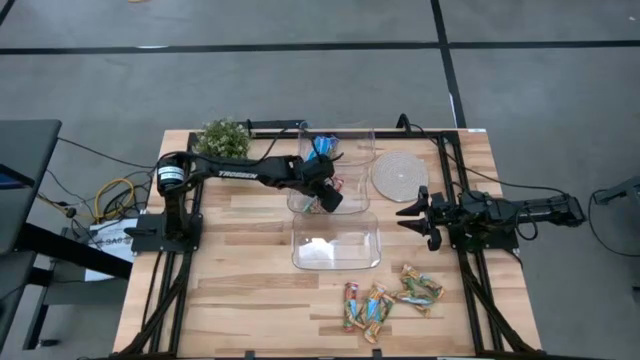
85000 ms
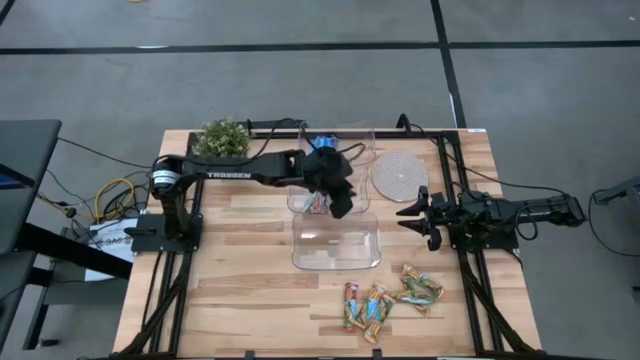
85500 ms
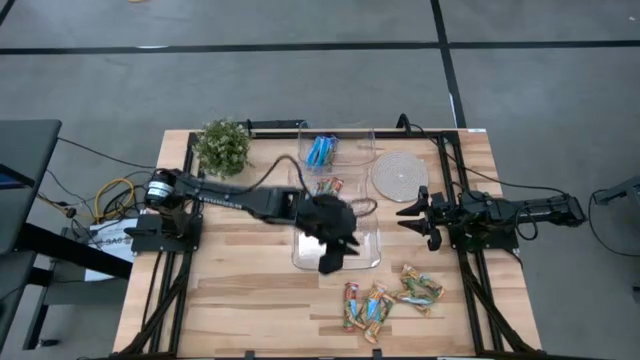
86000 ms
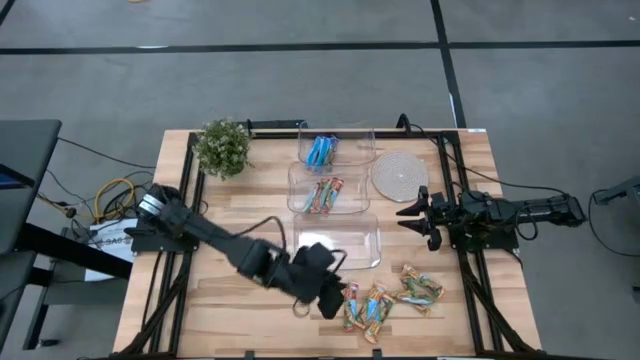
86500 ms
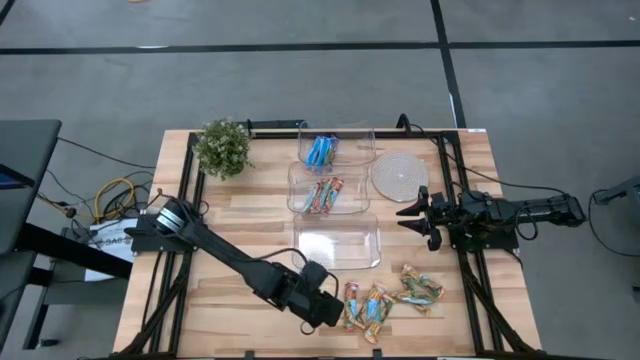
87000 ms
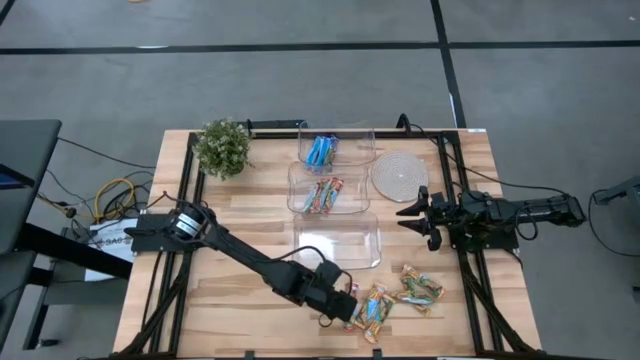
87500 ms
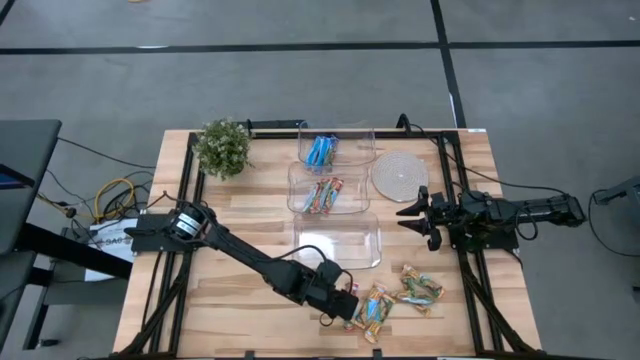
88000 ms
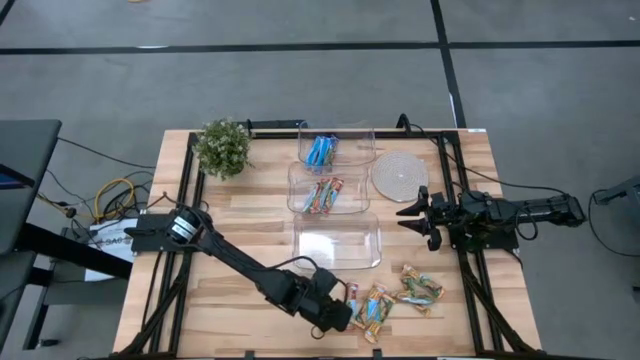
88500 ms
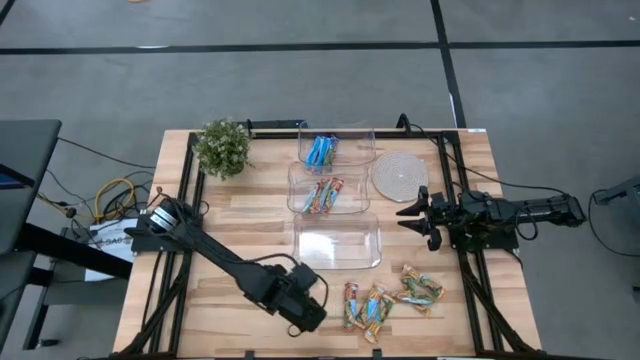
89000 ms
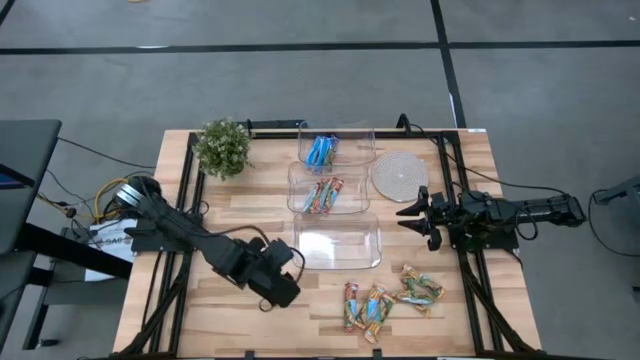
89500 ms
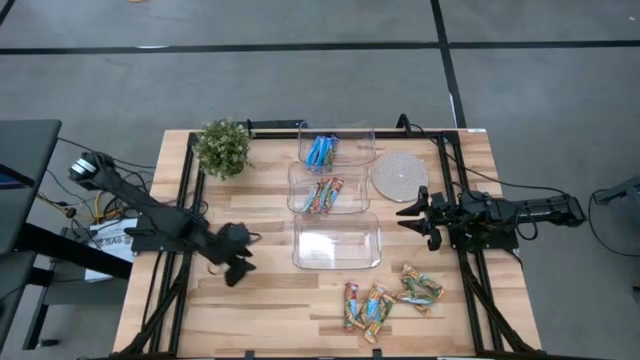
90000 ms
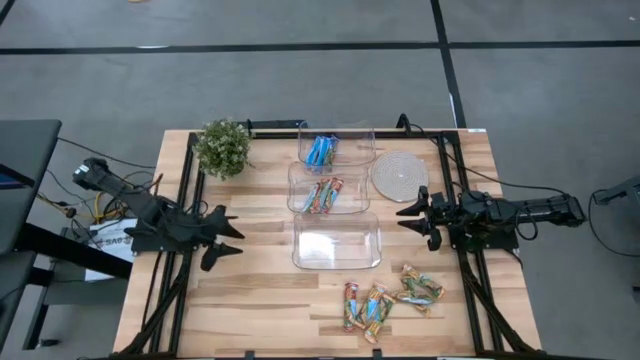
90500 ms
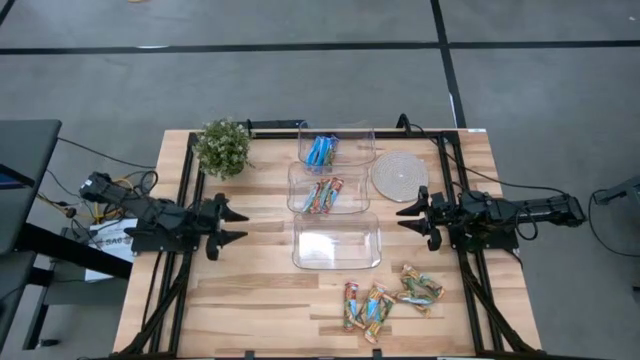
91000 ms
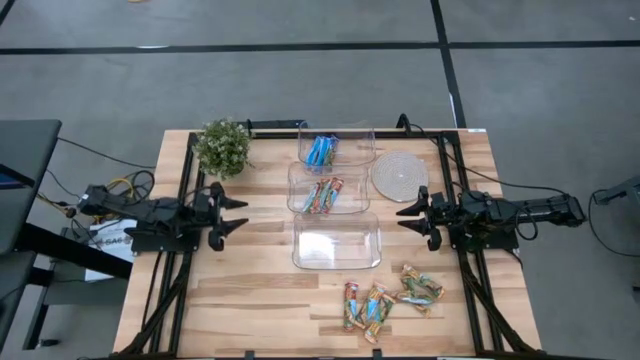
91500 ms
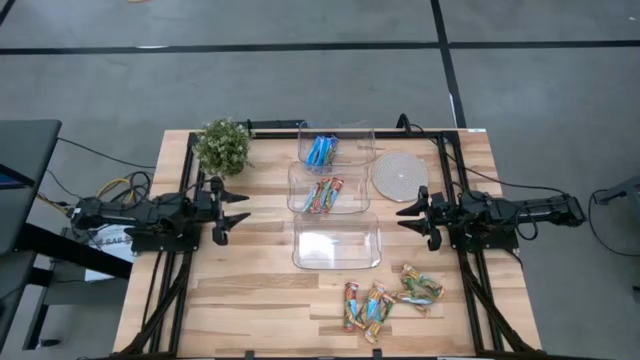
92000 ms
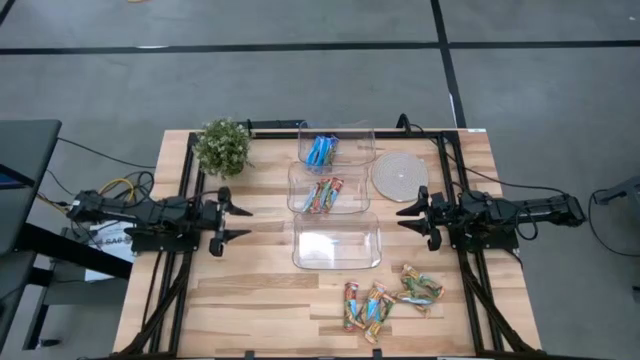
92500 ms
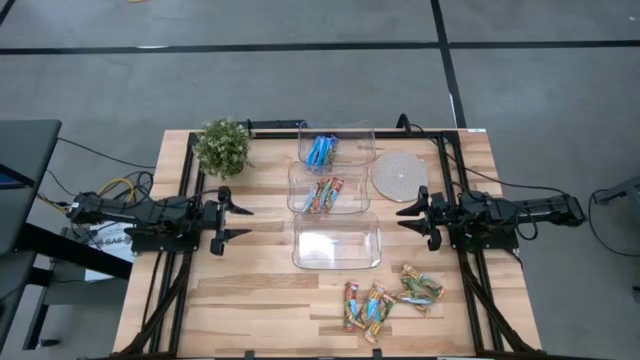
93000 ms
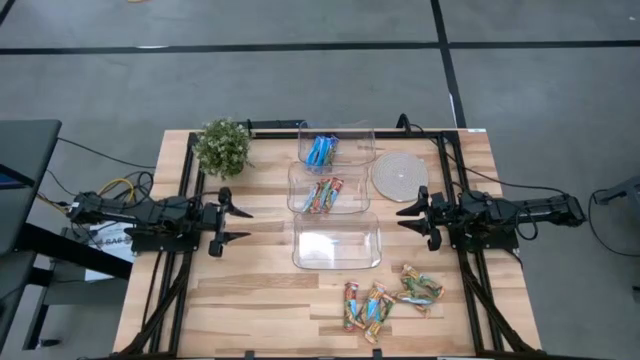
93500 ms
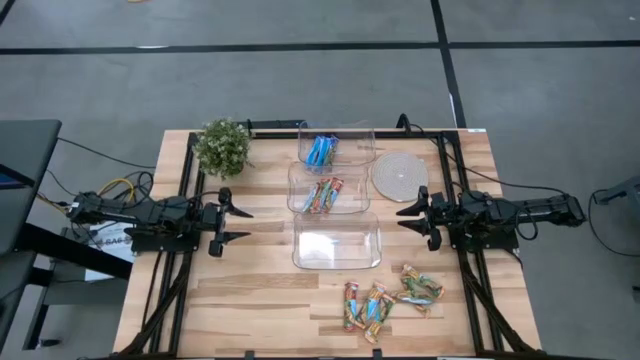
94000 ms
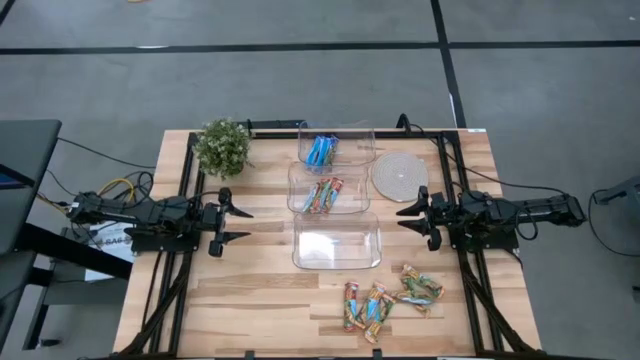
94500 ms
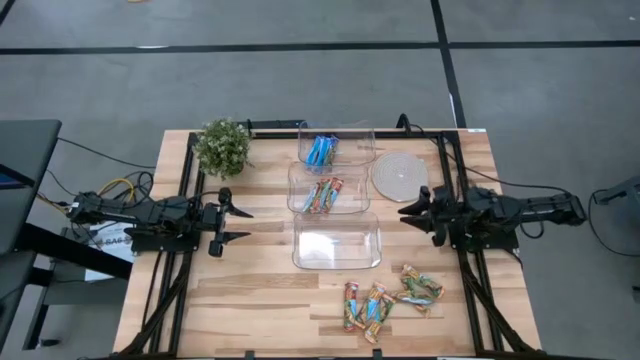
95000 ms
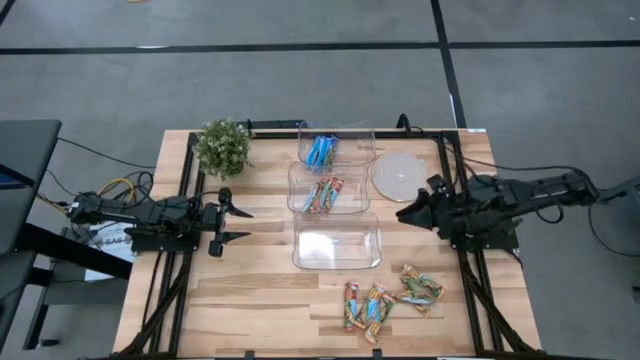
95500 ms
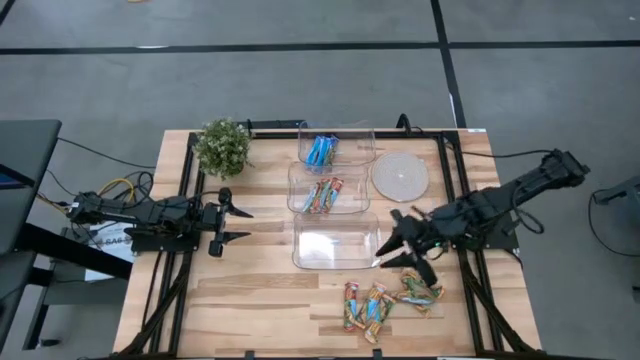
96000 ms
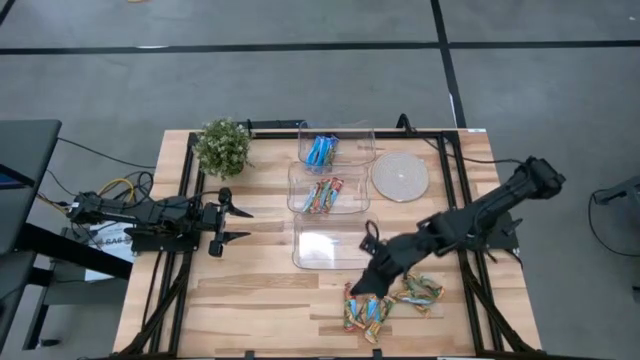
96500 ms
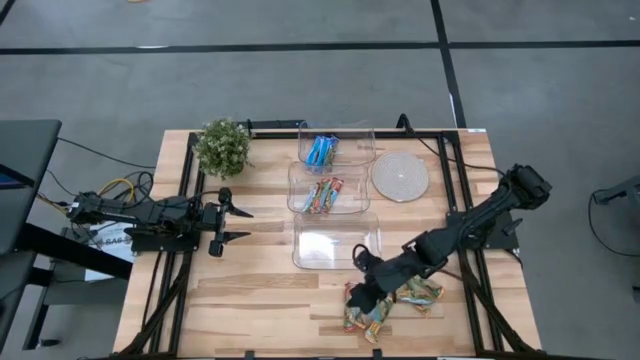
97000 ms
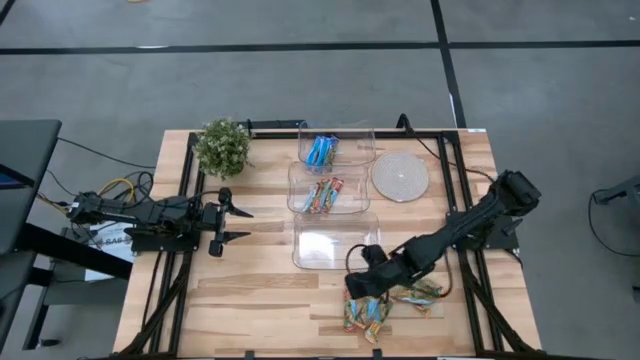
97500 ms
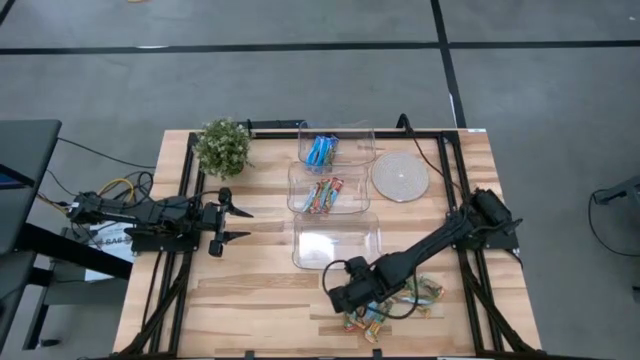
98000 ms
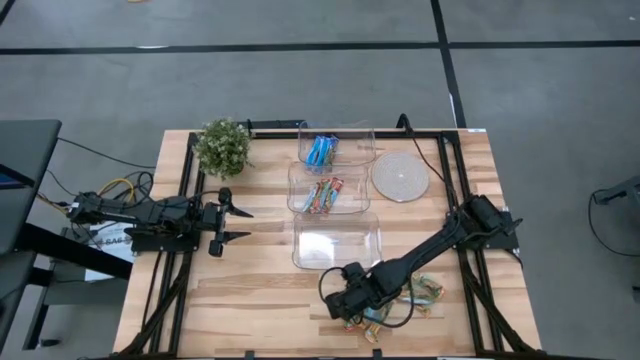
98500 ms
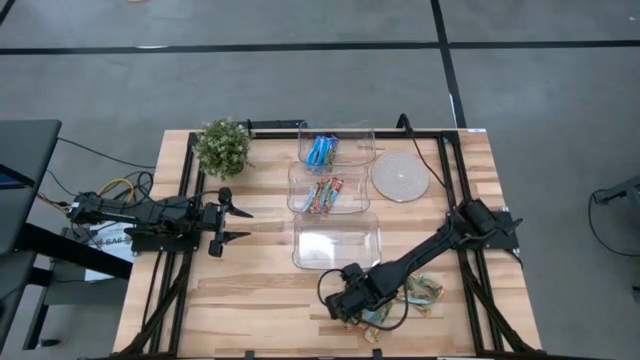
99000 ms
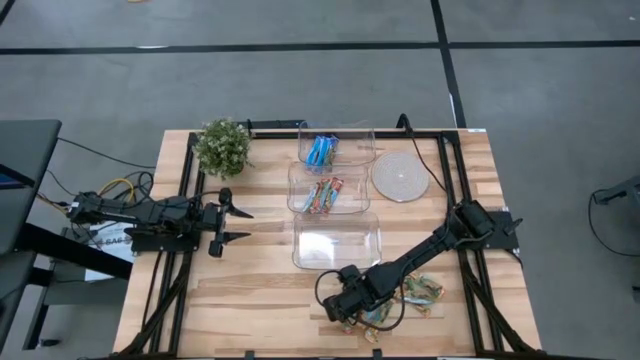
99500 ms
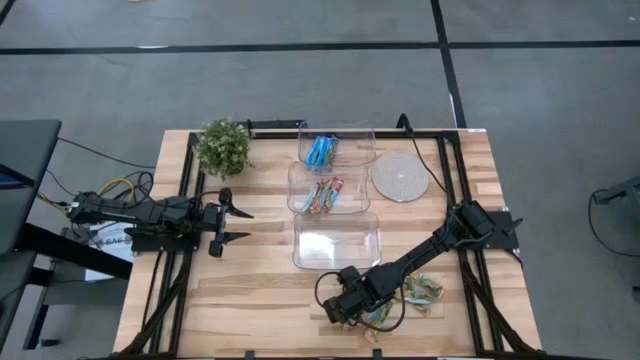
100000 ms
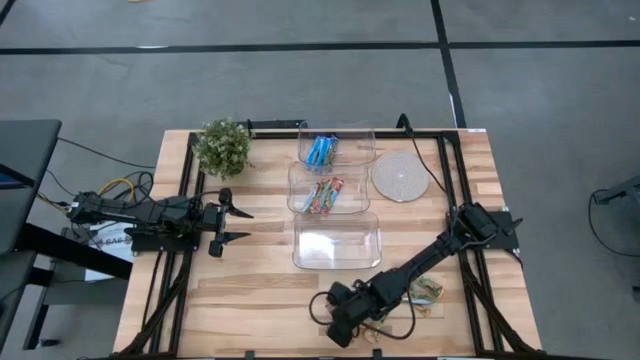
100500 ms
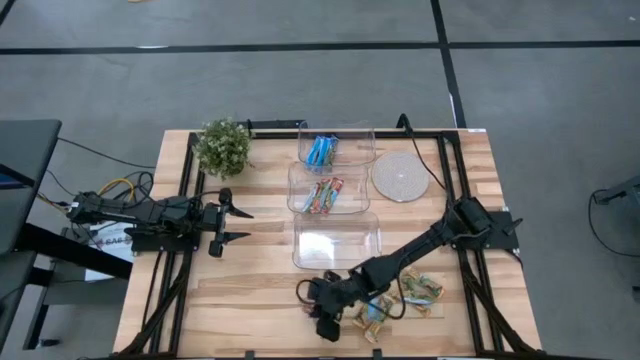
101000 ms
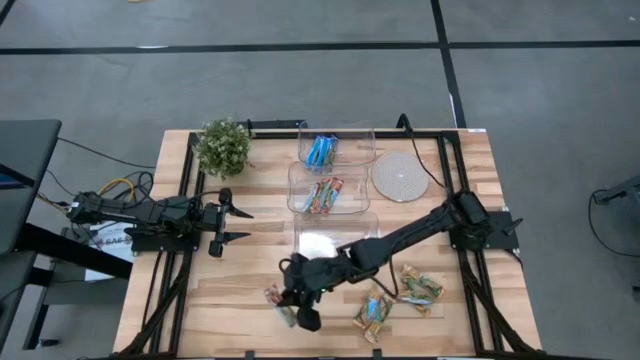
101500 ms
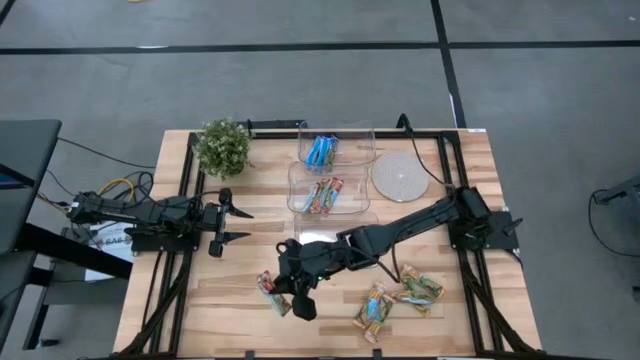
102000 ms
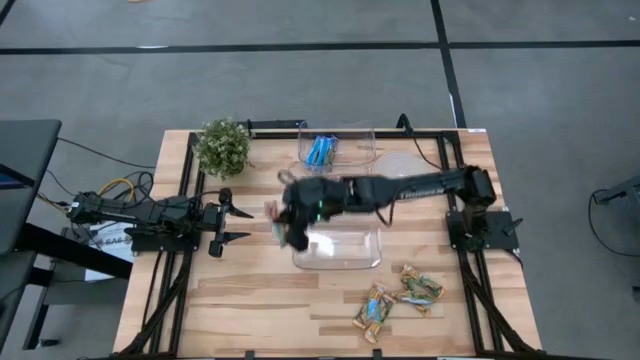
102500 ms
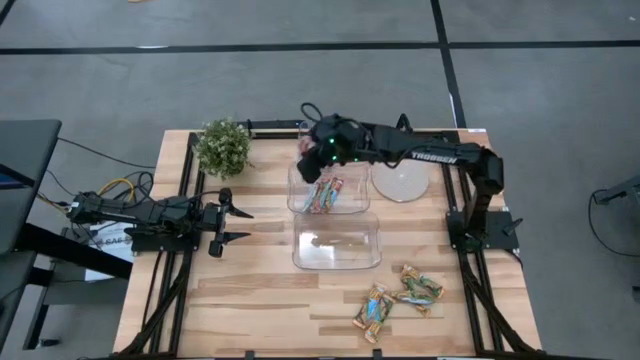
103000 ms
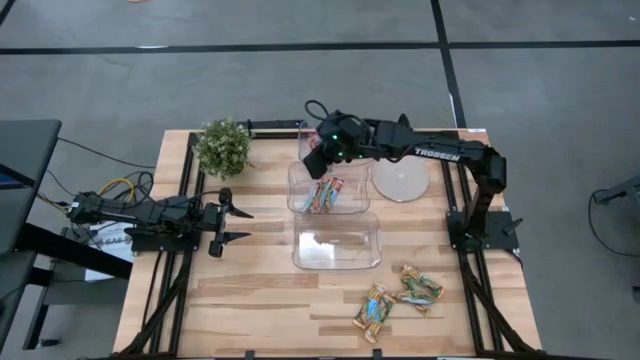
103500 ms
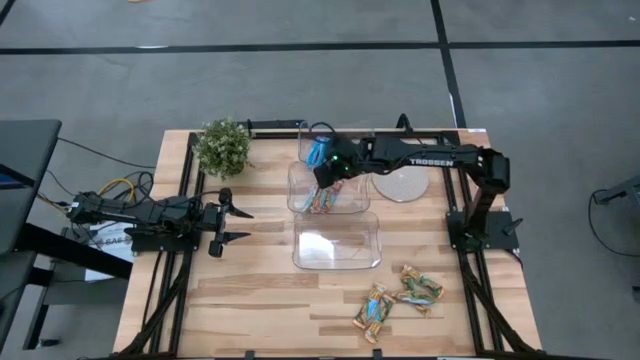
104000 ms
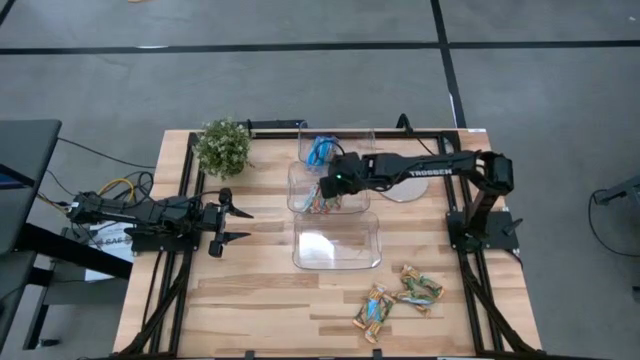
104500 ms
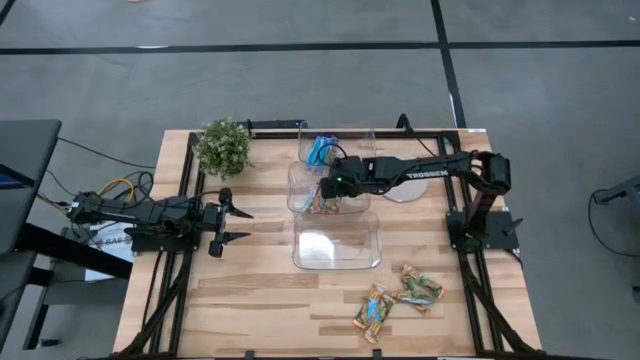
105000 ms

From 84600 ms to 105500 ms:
Task: Pick and place Granola Bars by type
Put the red granola bar into the middle transparent bin
